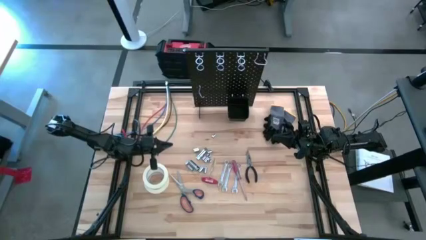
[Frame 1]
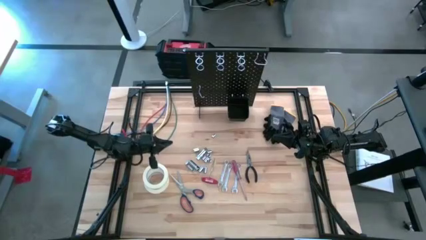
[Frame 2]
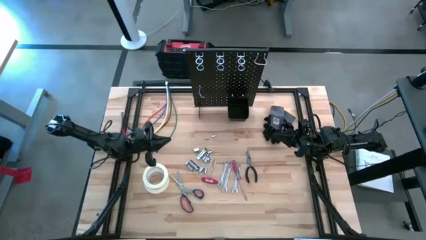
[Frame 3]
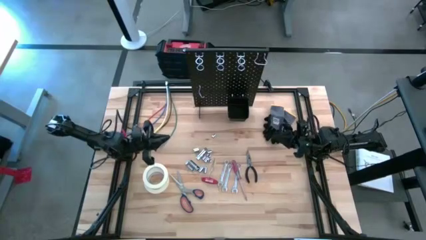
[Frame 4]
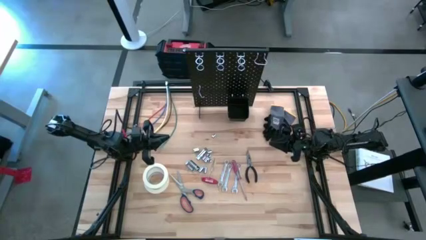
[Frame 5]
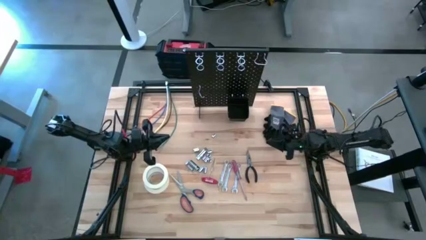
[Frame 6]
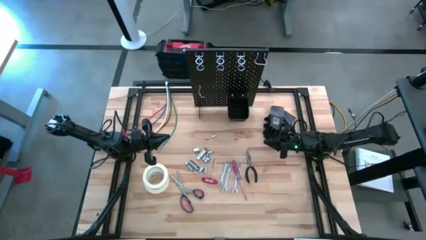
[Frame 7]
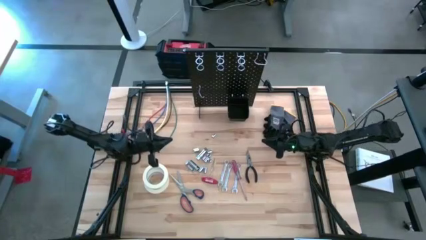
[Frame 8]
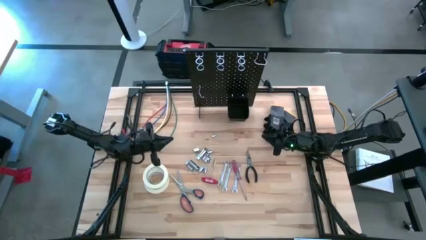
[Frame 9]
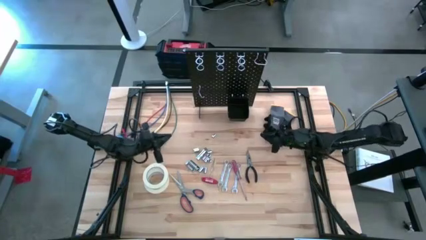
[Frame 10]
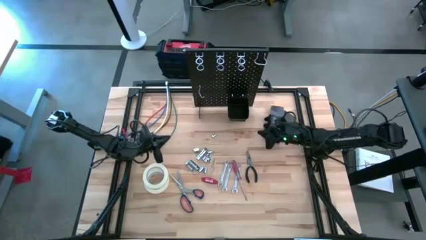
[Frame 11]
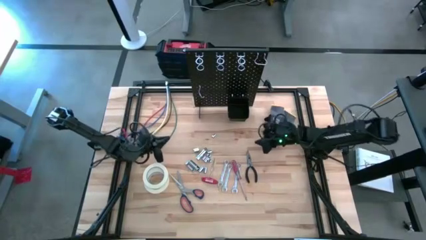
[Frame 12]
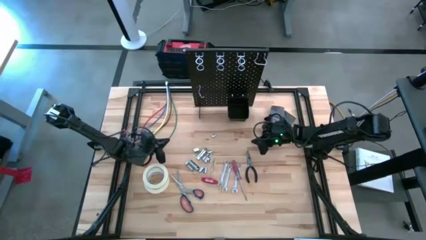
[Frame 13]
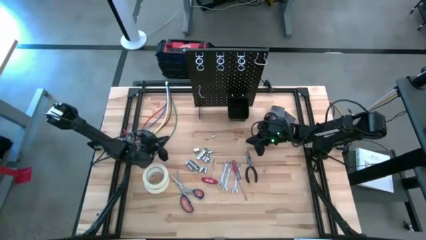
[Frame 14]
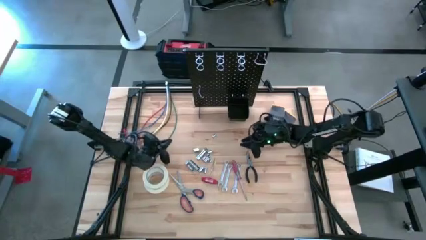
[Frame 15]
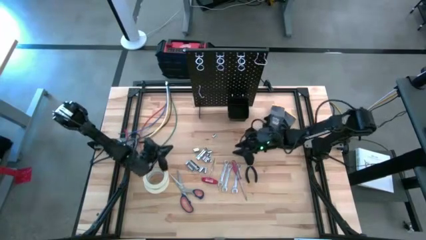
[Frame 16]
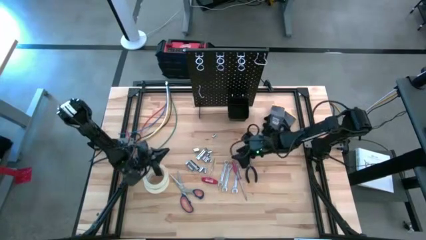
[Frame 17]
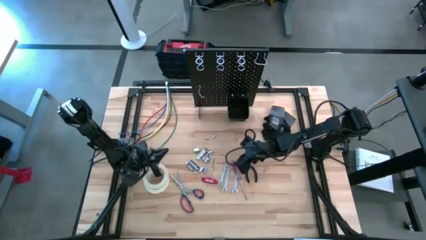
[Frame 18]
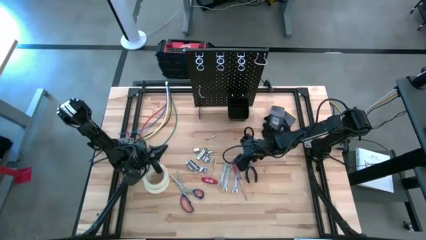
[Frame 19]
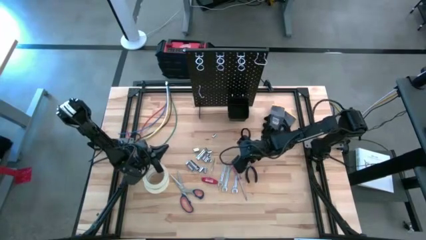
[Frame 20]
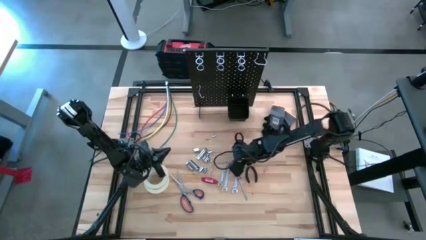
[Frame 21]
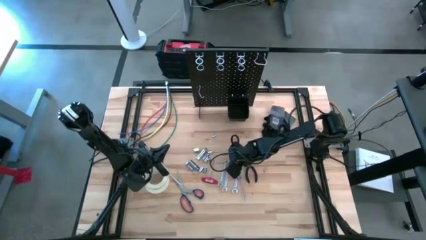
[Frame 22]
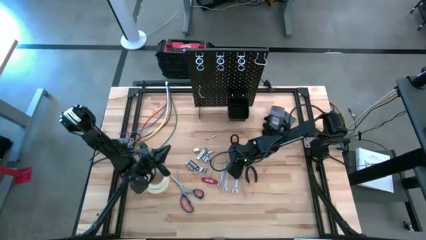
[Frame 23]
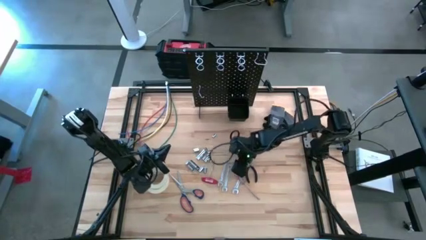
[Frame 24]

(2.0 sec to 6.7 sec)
Task: Hang tools onto peg board
Hang the red screwdriver on the peg board

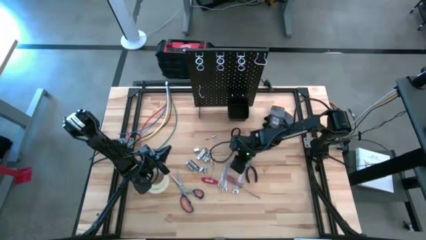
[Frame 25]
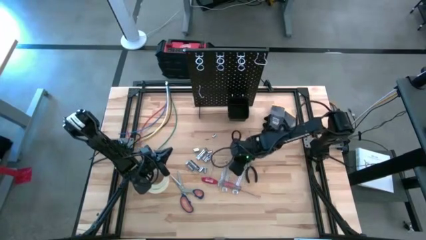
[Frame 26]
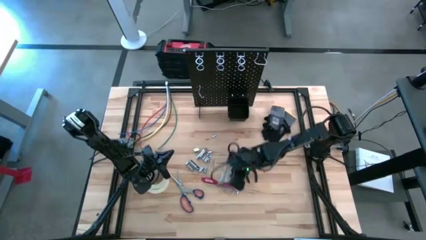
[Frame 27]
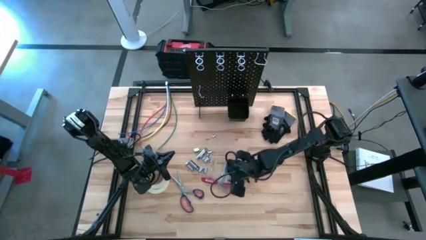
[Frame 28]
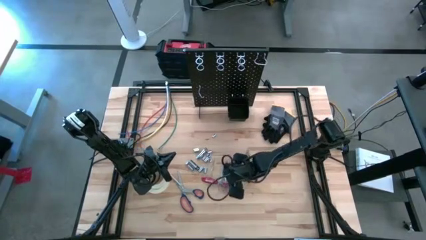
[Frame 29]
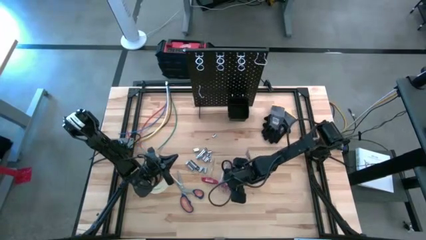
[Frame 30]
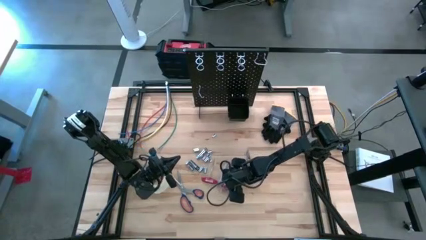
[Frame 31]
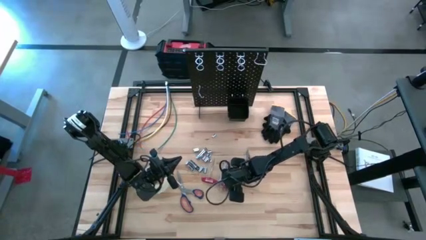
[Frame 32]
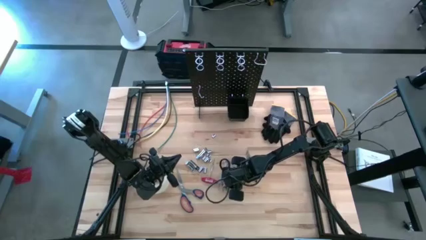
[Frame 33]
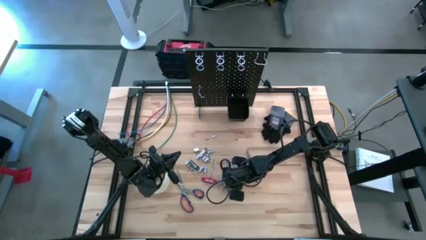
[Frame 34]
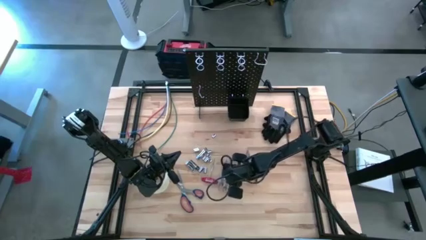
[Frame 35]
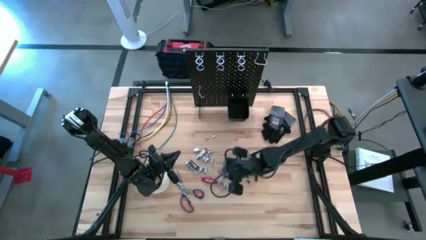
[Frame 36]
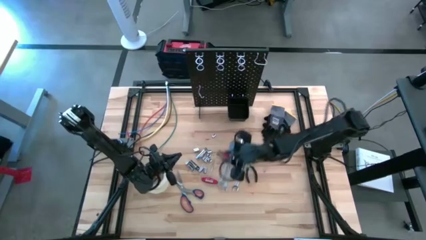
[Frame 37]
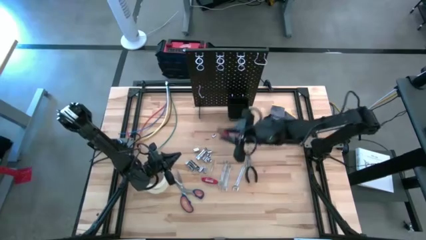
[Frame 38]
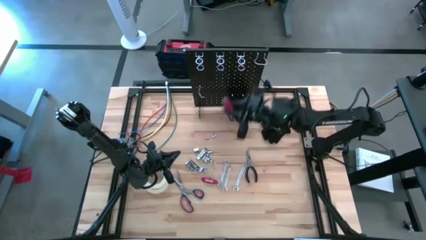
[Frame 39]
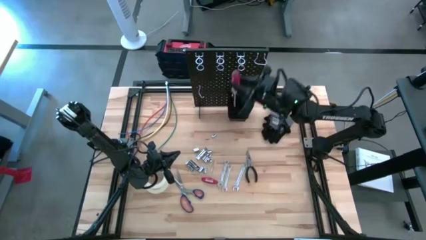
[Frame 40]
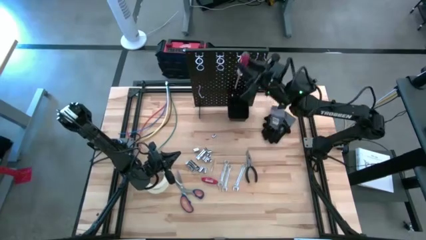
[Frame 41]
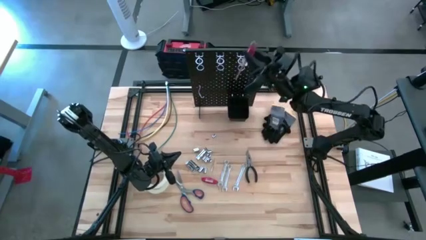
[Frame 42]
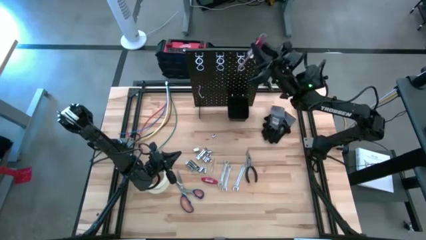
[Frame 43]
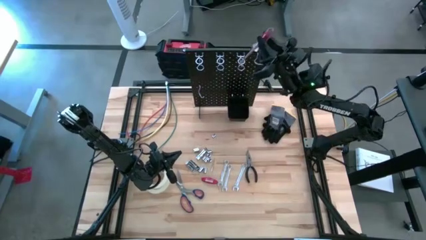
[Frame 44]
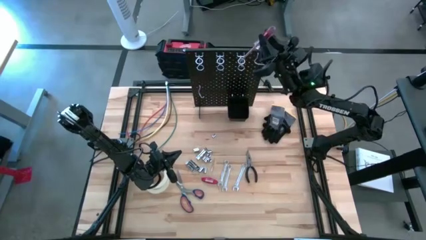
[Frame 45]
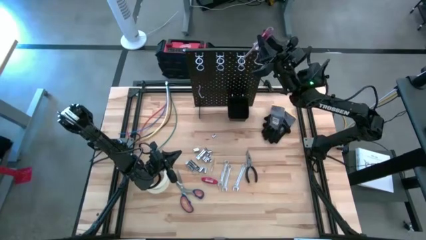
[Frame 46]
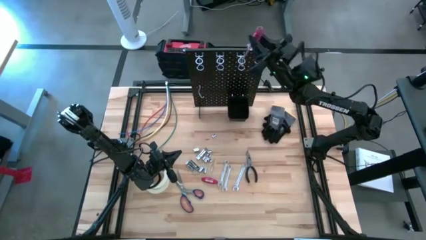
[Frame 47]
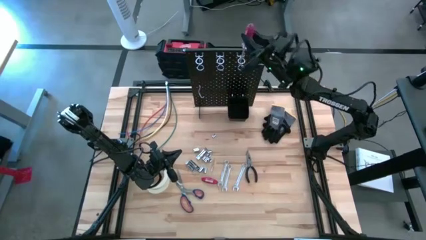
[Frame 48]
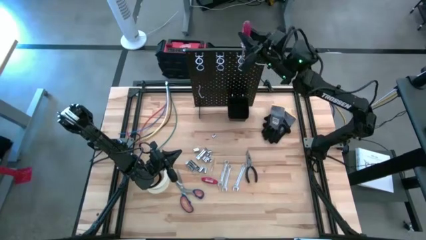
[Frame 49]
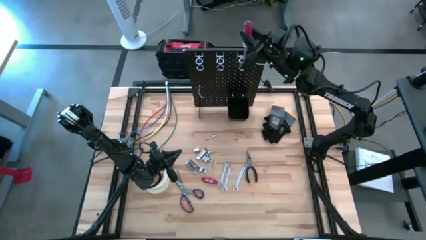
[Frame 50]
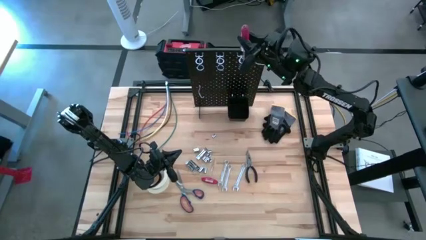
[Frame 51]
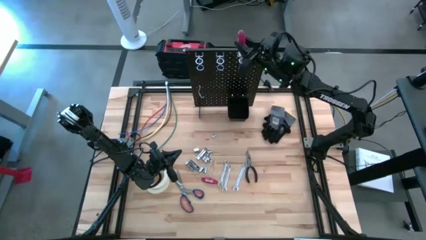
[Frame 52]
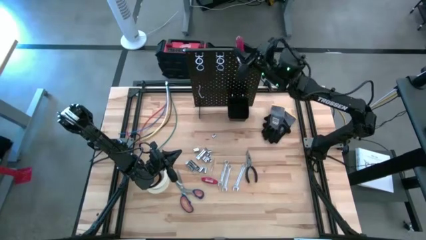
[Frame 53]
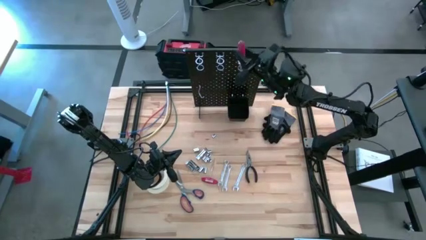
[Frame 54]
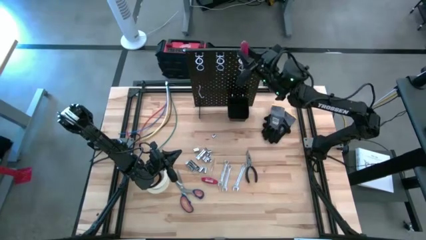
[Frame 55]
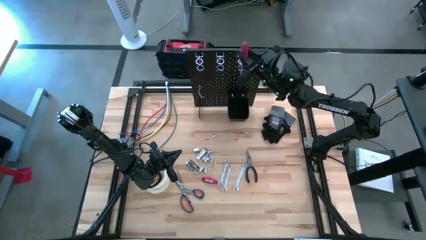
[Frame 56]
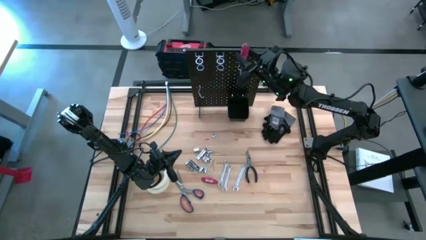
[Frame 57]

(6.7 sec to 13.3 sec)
Hang the red screwdriver on the peg board

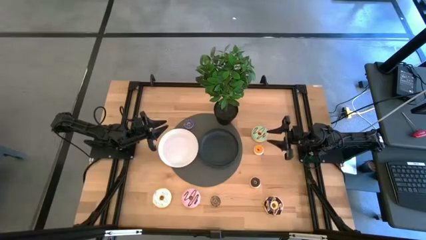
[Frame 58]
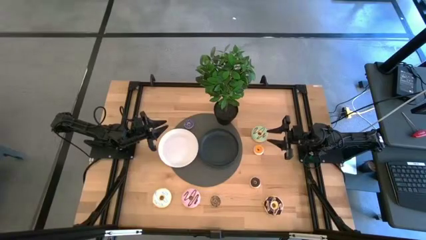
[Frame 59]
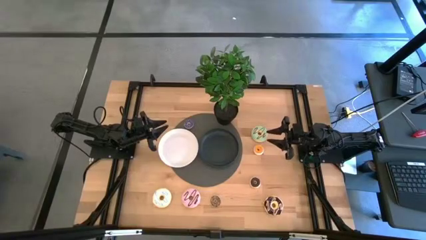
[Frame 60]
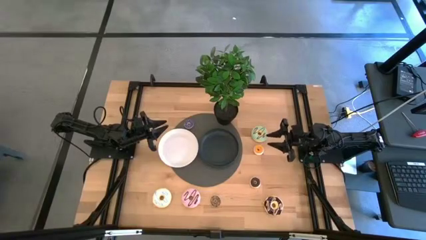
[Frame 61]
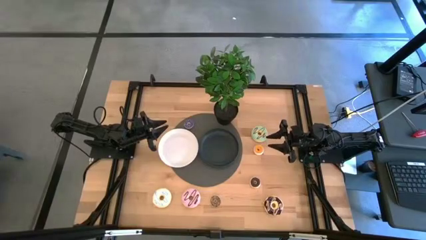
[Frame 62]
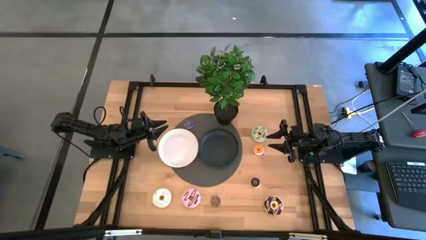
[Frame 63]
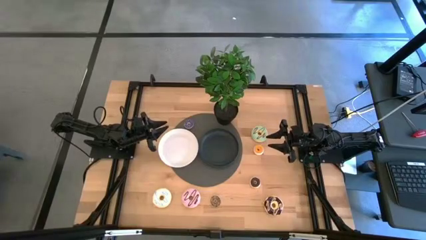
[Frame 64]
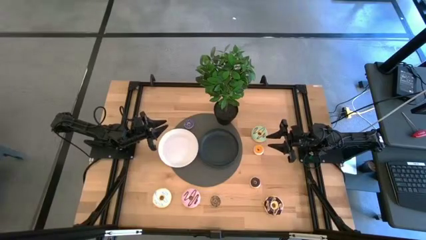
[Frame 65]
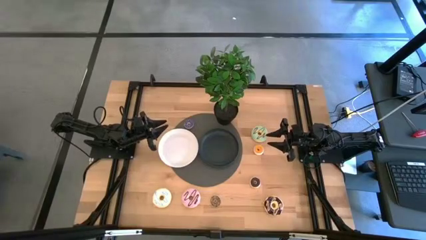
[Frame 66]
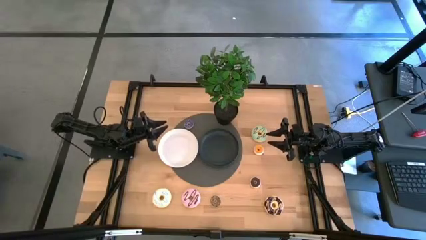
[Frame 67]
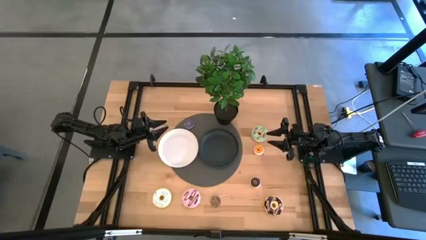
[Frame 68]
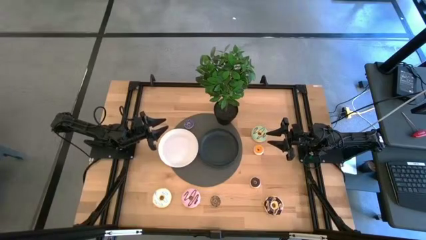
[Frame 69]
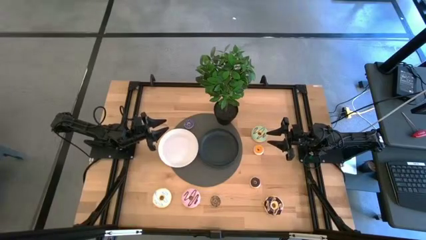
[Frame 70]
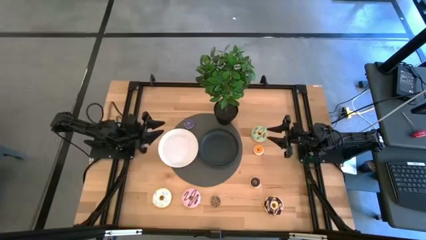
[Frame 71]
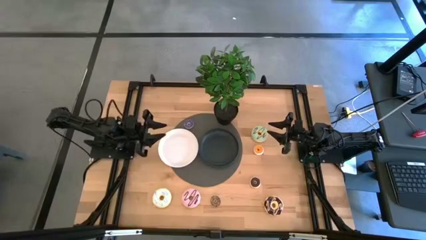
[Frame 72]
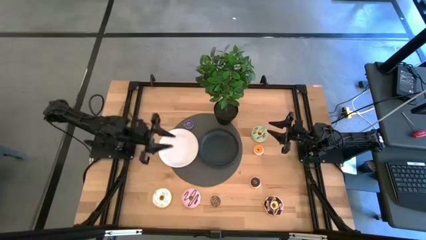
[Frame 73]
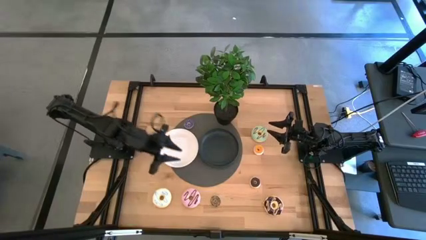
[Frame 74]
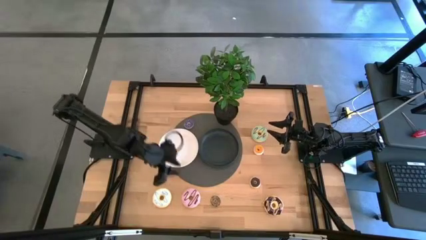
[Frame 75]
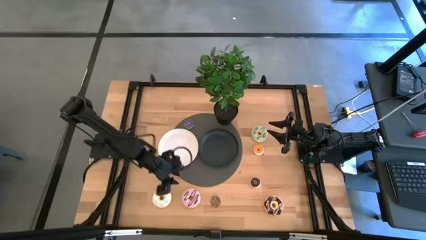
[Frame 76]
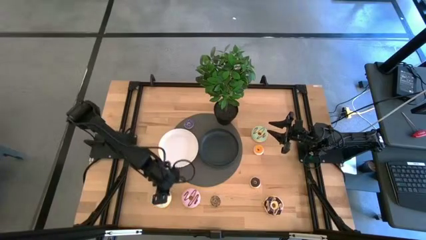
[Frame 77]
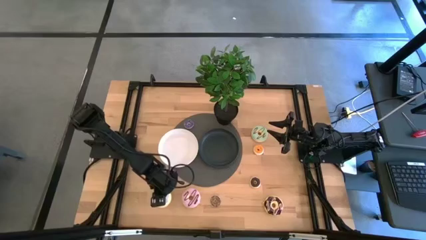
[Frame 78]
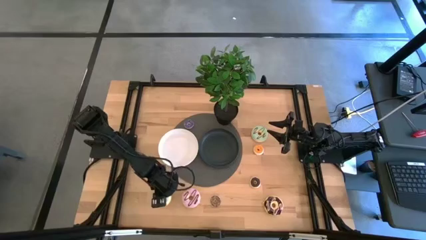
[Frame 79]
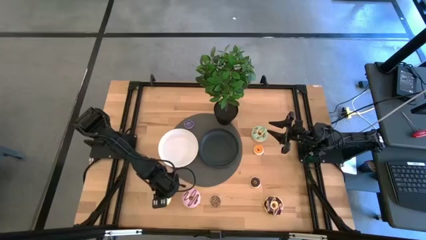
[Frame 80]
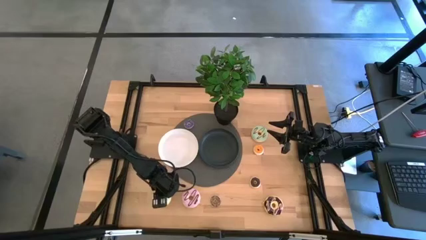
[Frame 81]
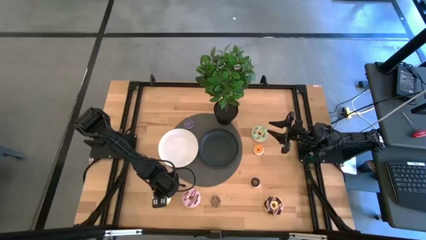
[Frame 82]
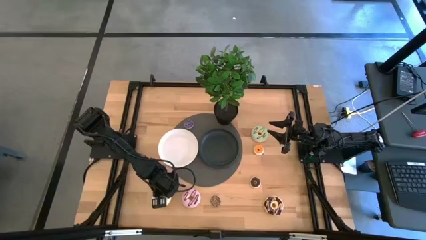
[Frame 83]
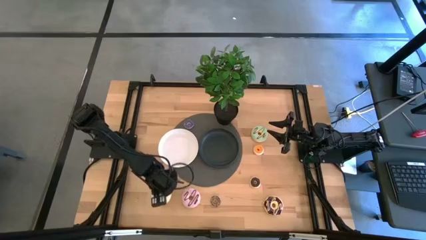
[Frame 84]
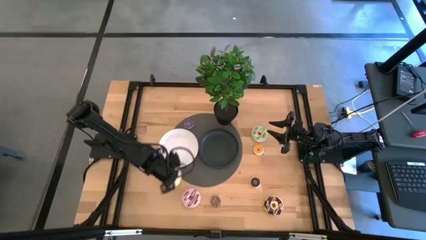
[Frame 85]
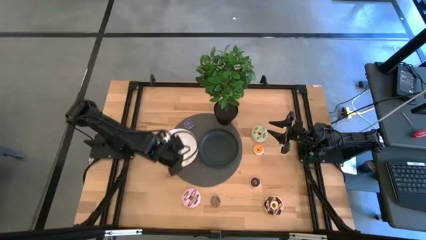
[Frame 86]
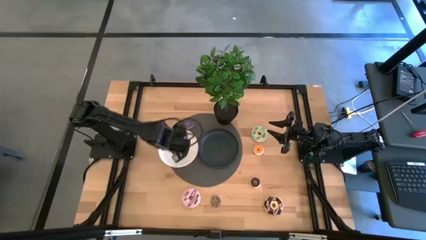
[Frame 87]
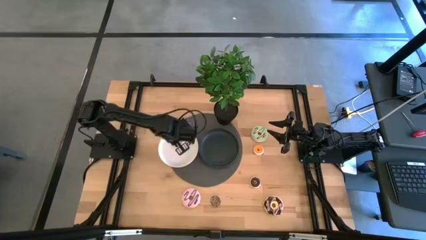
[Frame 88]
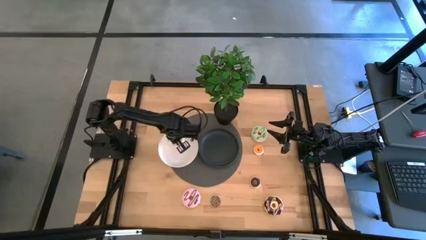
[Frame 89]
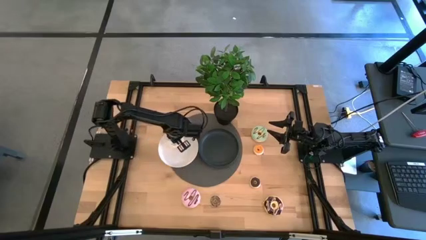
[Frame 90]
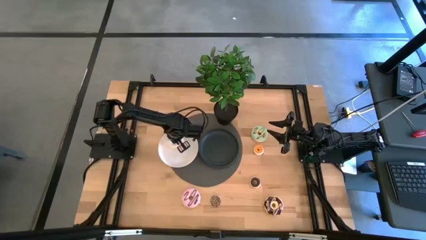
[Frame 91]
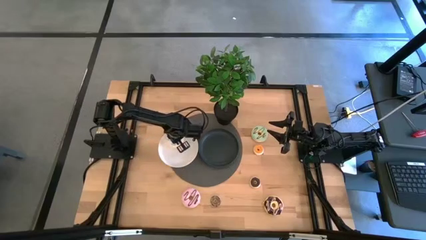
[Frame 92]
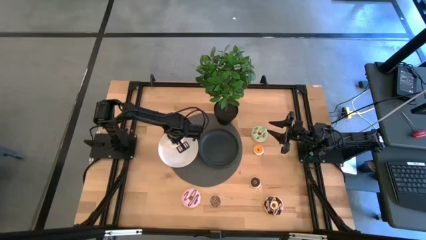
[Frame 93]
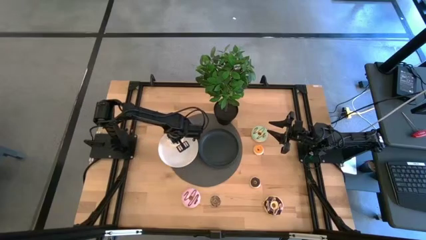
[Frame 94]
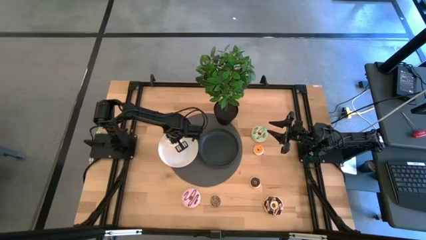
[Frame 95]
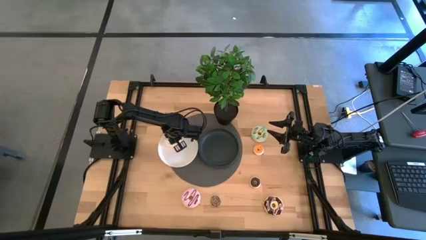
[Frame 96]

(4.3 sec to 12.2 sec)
Task: Pick & Place donuts
Put the large white donut on the white plate
